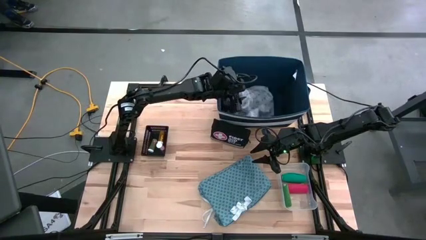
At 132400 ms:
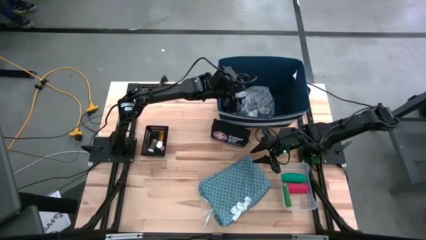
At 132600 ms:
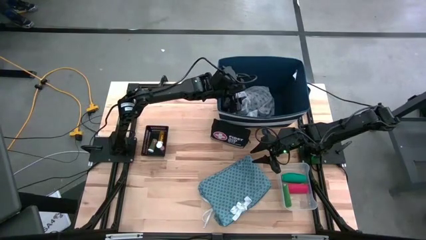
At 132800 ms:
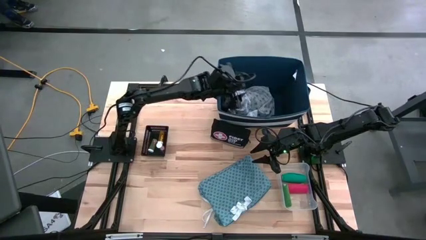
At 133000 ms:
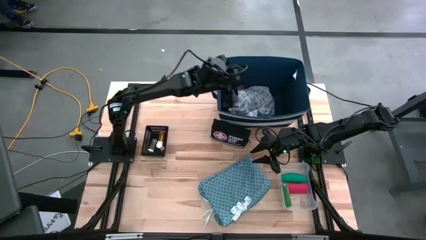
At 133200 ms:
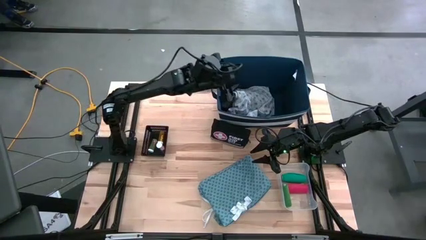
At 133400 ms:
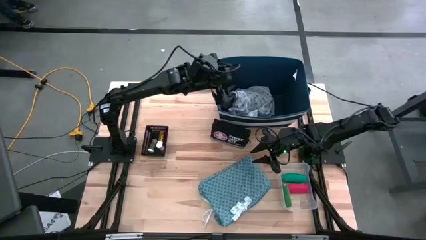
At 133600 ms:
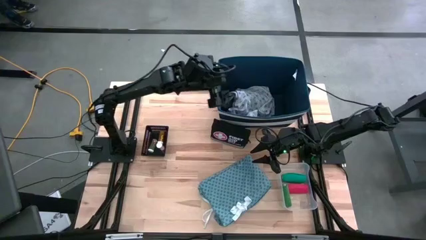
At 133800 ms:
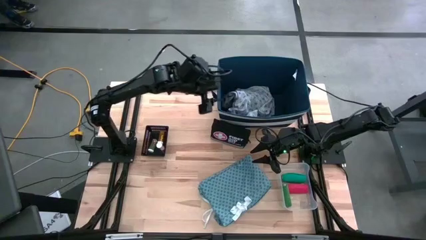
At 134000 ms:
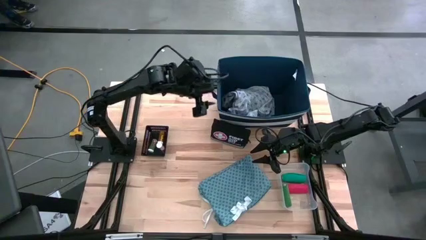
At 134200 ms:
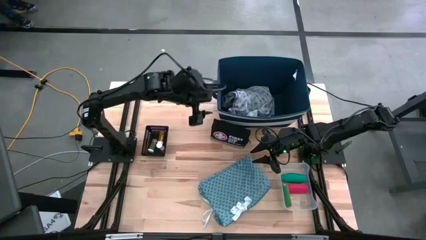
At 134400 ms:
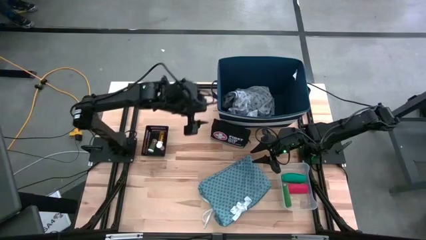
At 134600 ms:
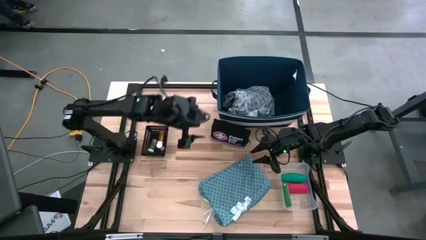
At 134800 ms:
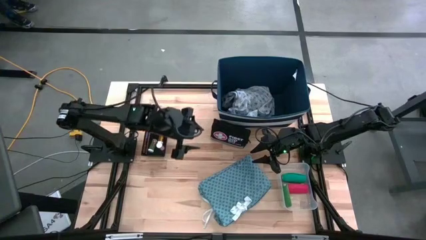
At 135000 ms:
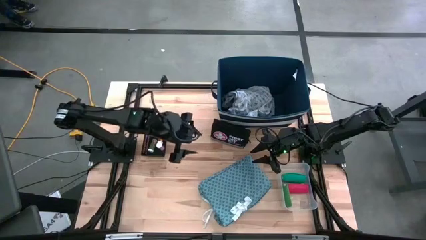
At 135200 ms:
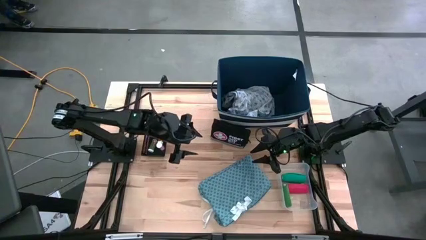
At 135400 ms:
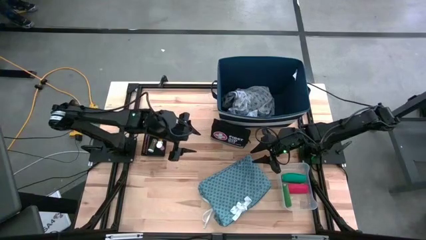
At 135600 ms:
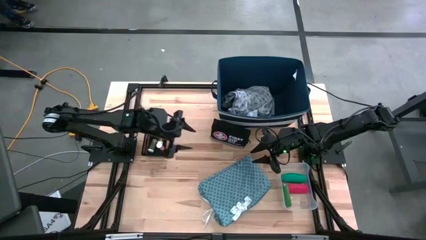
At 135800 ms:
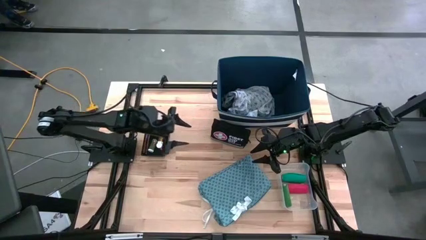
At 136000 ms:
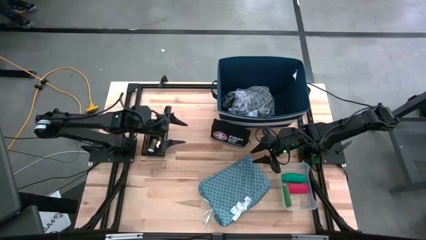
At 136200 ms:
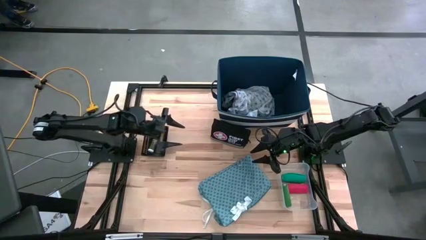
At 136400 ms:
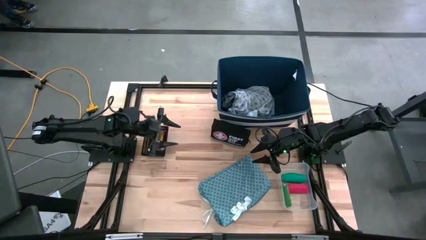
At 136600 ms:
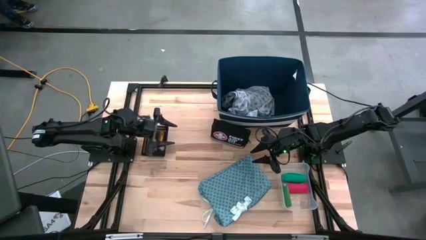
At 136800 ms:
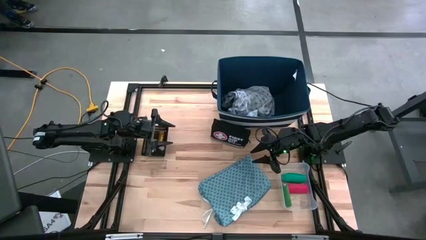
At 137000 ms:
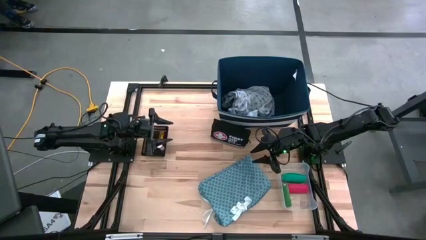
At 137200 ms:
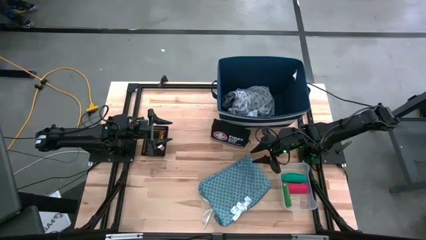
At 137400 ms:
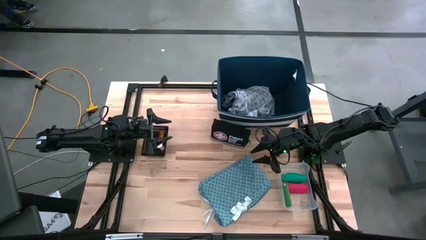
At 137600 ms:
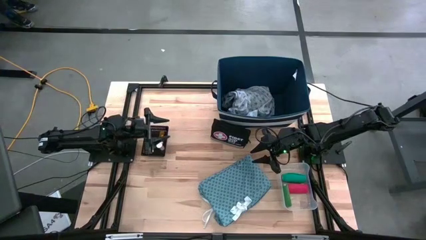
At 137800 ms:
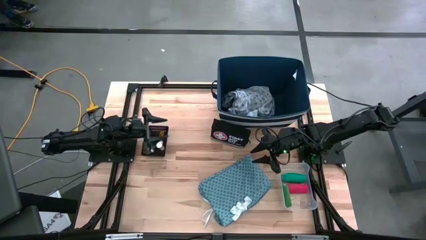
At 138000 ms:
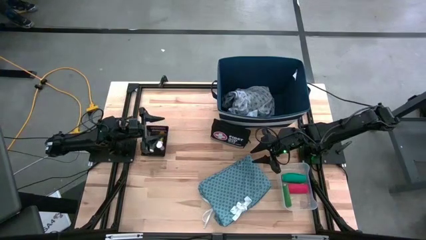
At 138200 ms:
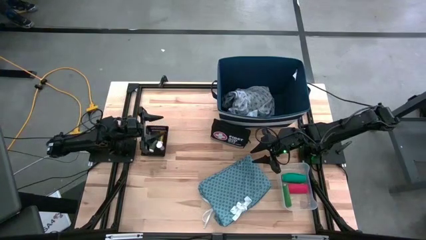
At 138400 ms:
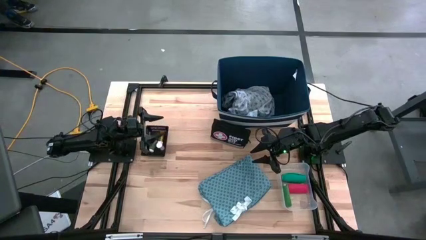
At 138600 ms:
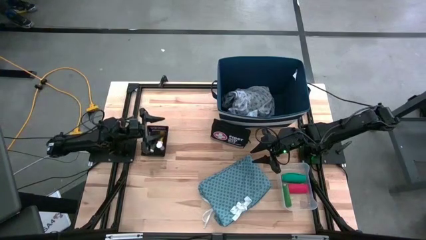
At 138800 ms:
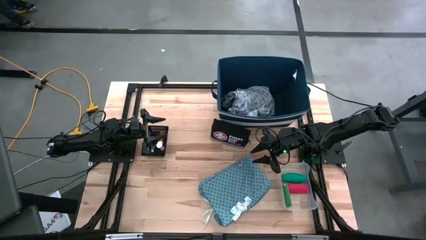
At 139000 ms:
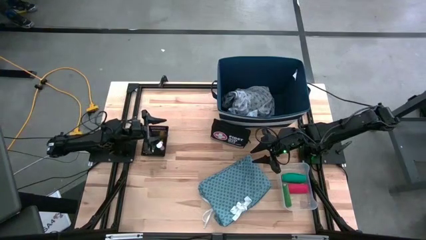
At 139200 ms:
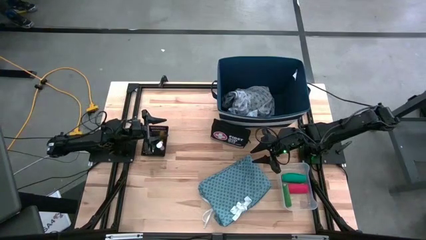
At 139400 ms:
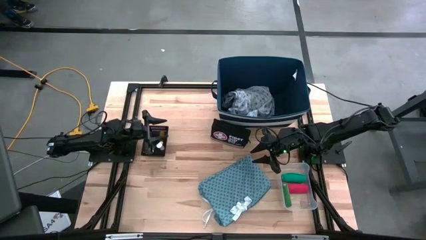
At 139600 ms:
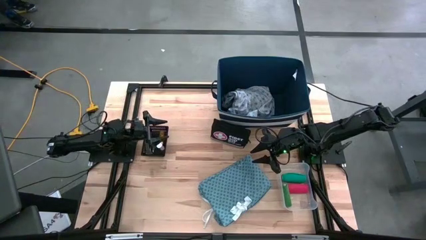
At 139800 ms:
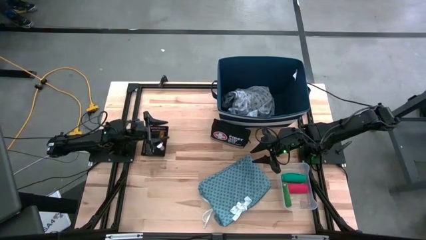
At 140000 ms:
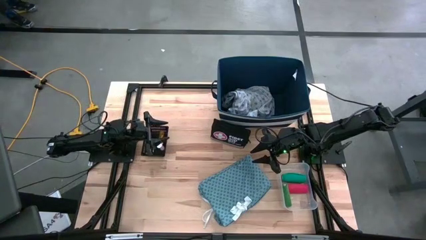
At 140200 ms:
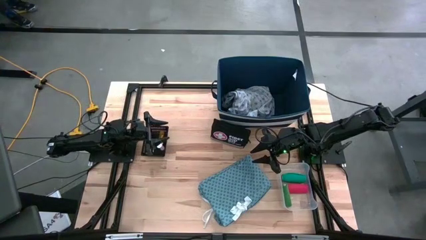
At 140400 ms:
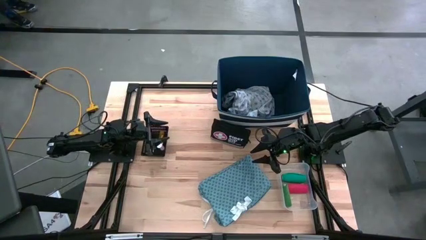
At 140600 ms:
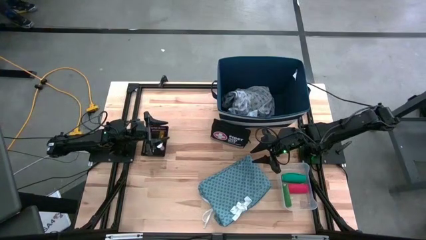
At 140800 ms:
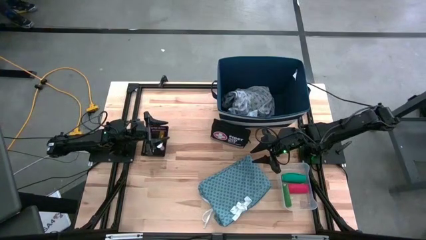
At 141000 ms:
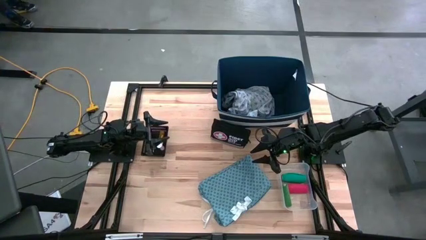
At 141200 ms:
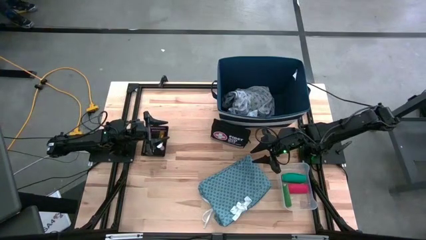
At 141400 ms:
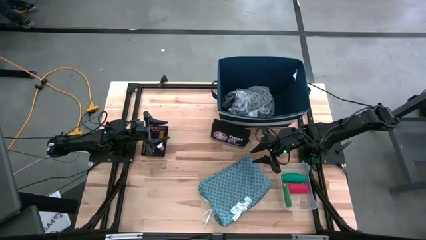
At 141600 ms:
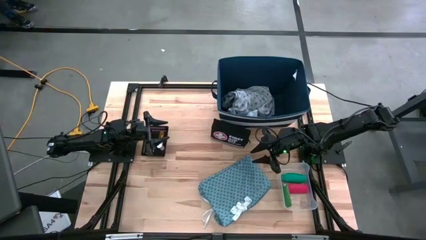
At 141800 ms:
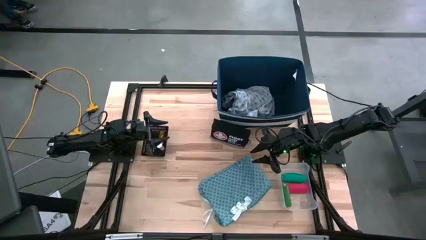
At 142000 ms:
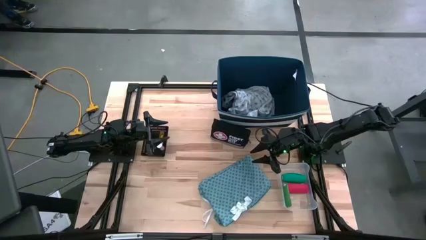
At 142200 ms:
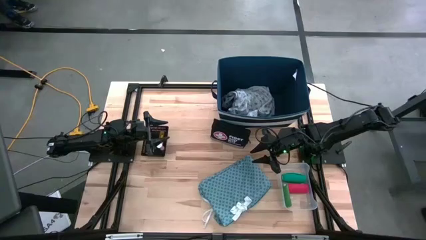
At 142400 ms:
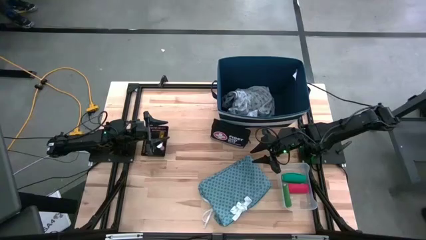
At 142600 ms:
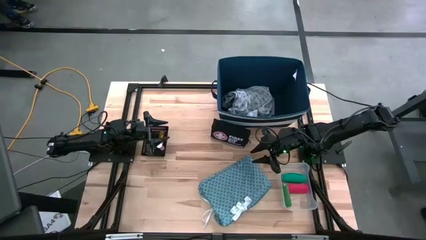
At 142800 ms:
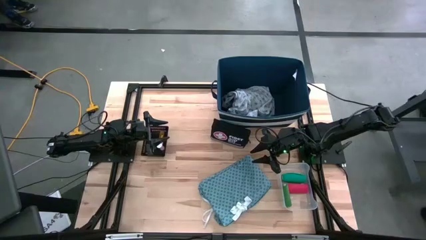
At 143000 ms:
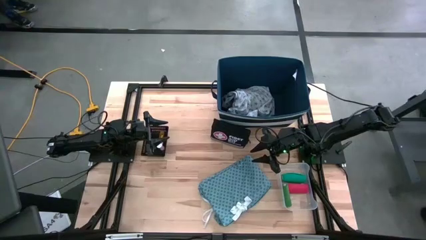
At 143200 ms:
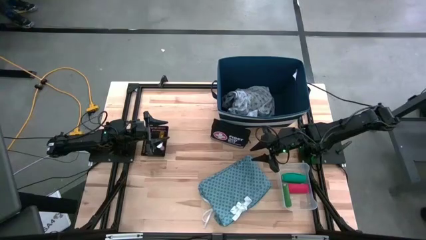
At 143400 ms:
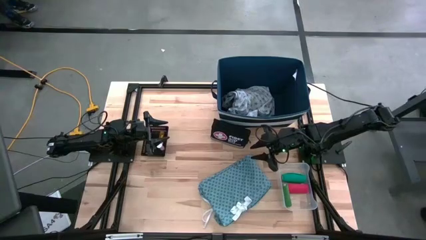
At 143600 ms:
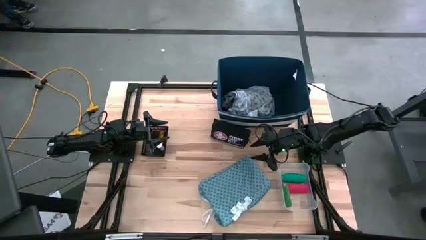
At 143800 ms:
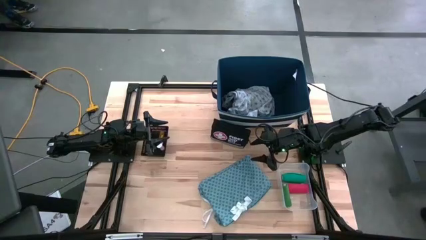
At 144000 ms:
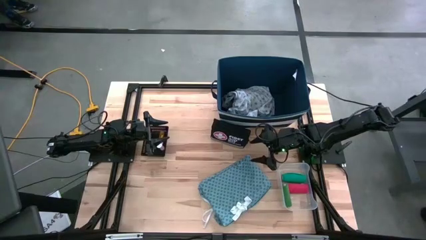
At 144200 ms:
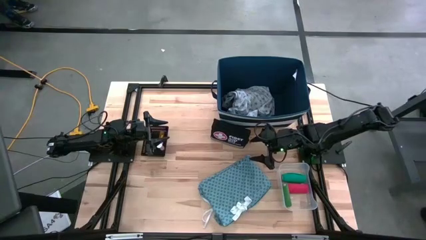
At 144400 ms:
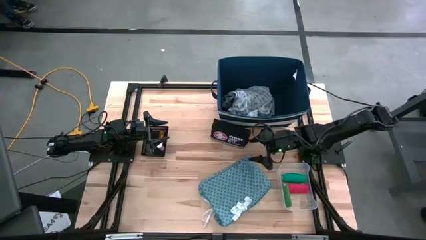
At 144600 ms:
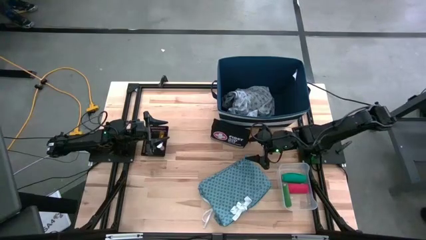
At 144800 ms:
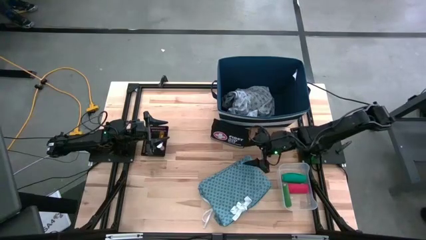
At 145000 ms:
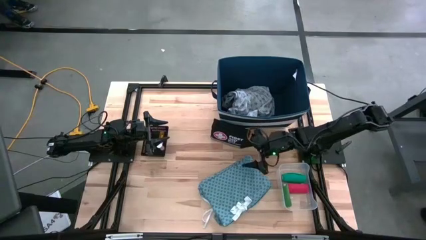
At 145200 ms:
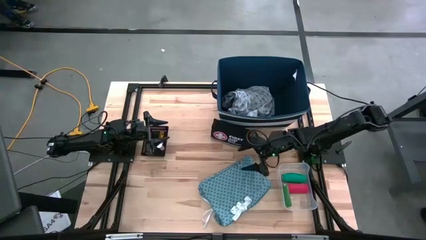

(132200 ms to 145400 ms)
Task: Pick & place medical supplies in basket/bin
Put the blue patient gown into the blue laundry organizer
